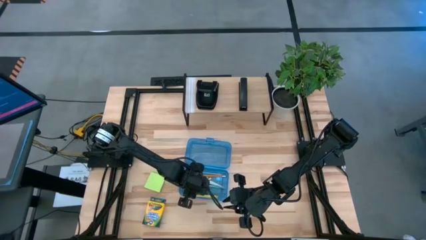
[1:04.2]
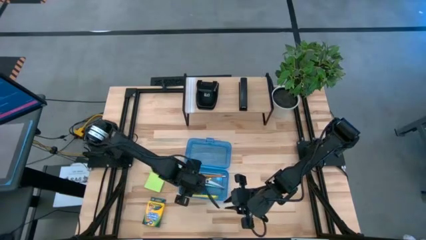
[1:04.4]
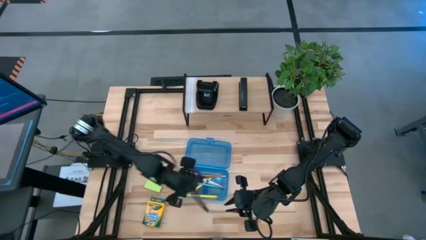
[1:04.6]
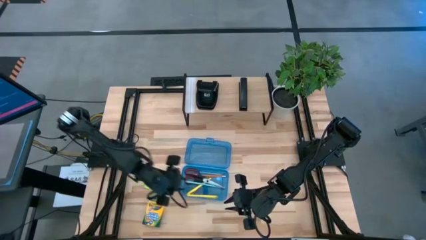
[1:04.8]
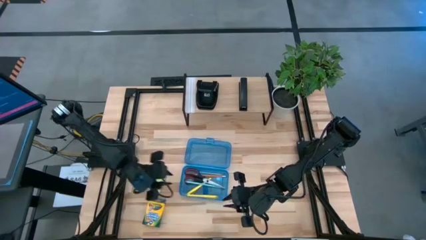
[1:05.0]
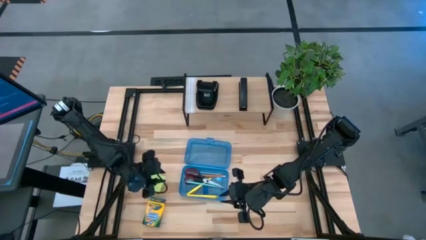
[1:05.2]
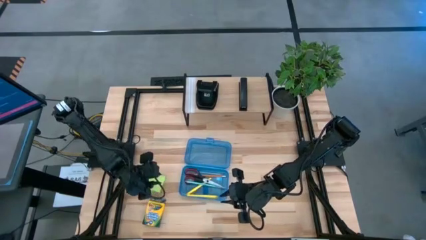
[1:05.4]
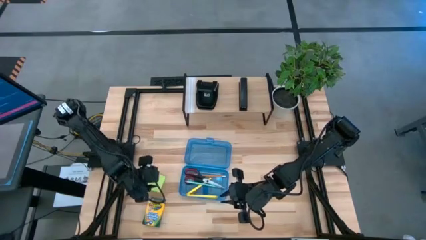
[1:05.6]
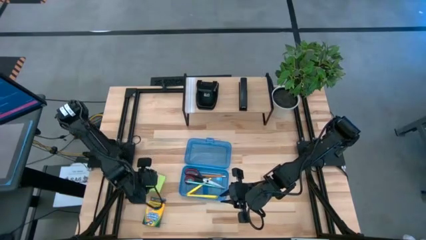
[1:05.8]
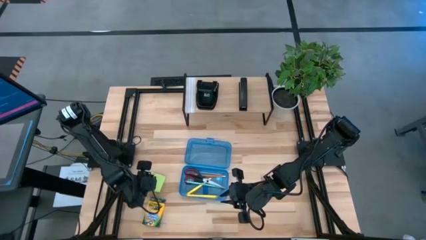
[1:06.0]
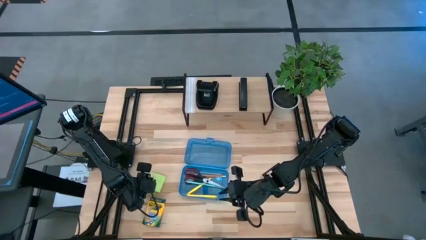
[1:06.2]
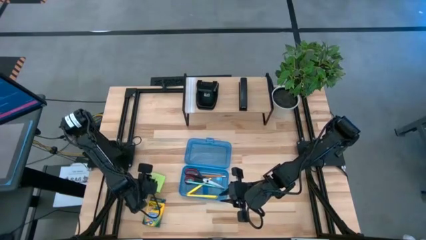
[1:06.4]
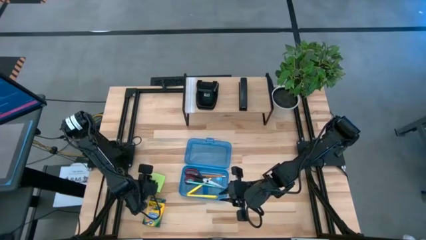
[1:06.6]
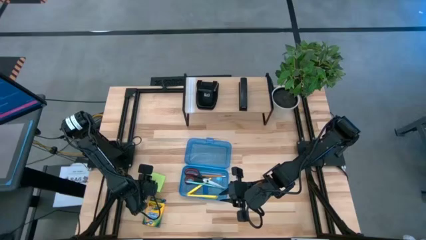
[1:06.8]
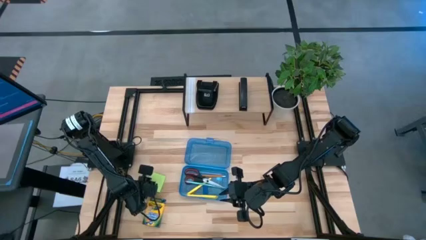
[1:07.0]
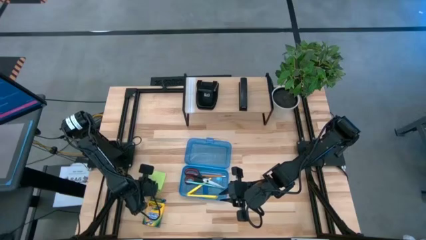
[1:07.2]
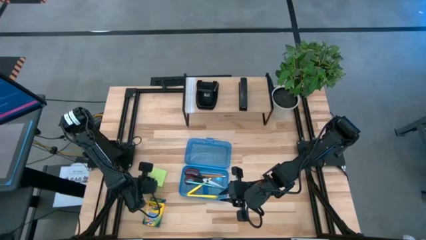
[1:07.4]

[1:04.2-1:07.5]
Task: Pack school essentials
Put the light green sticky notes into the blue supply box

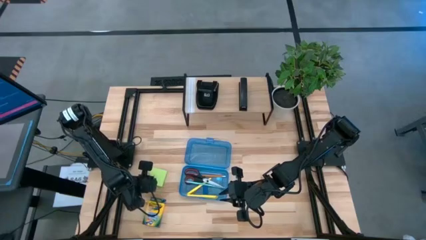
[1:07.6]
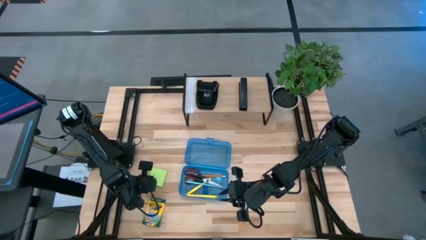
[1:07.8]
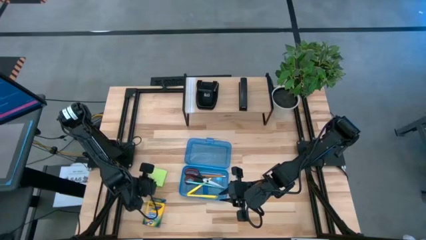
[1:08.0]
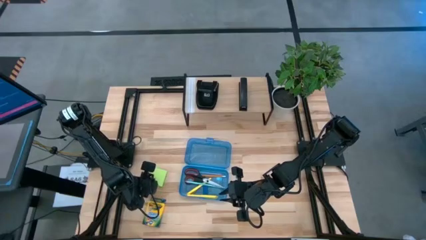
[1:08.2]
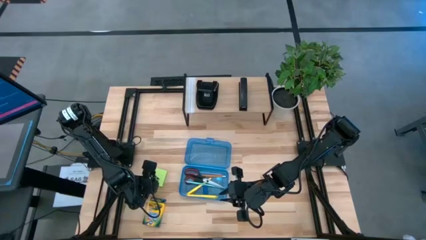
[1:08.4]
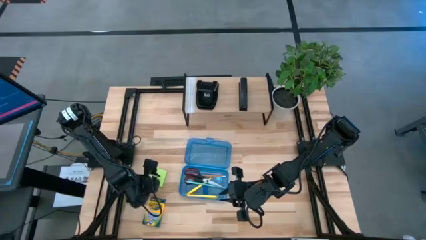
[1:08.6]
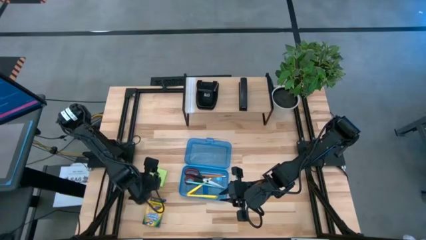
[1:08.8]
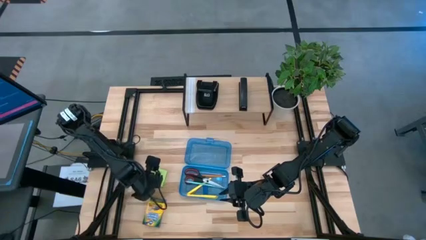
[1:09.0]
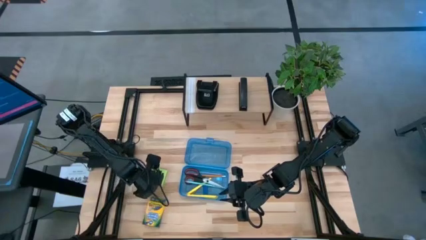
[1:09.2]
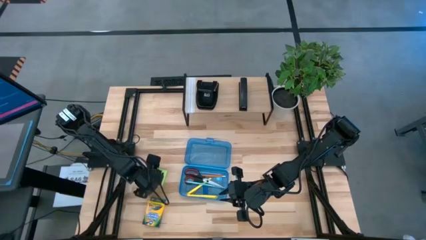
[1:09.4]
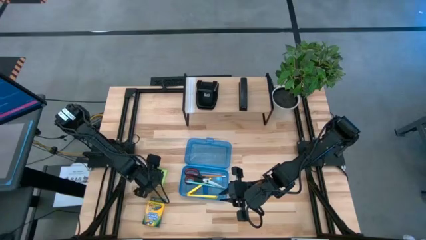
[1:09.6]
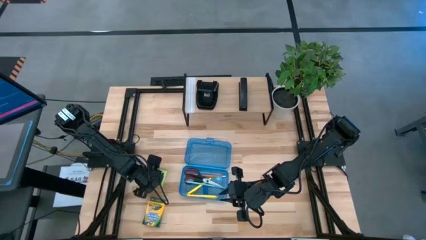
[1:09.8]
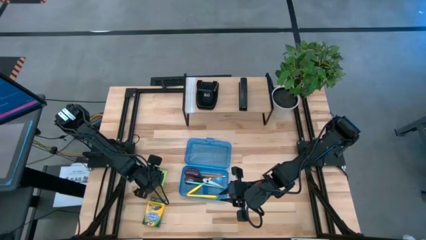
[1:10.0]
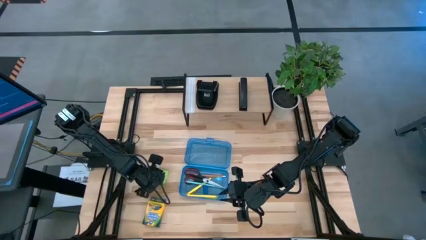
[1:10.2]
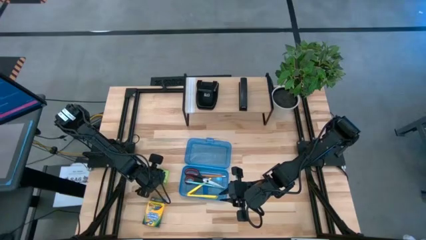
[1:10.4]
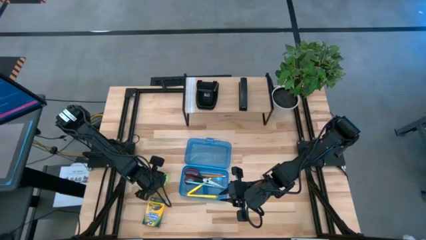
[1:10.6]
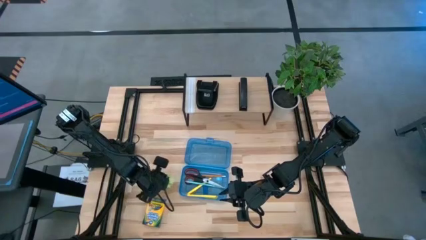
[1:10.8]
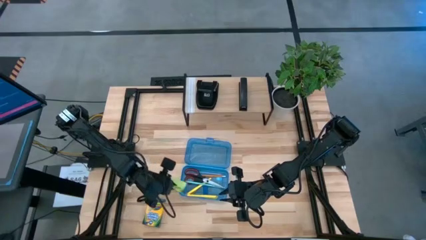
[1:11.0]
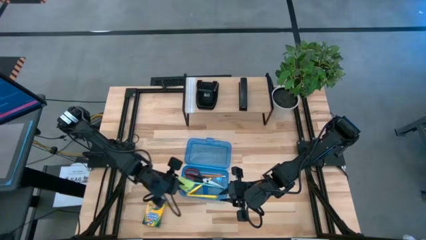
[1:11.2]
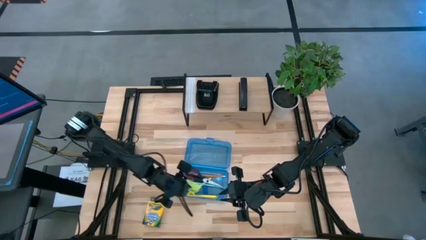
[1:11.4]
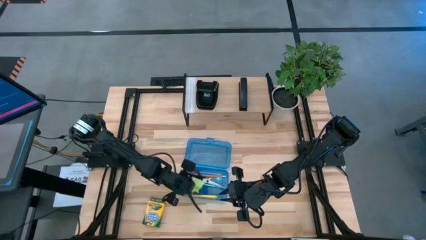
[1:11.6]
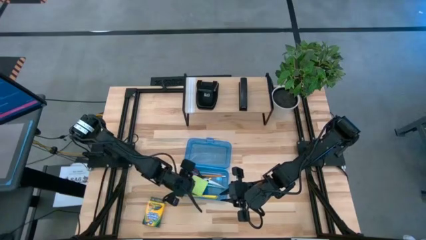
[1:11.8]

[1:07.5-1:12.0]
Put the light green sticky notes into the blue supply box

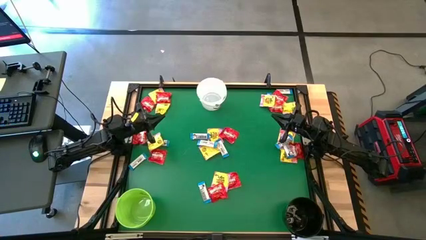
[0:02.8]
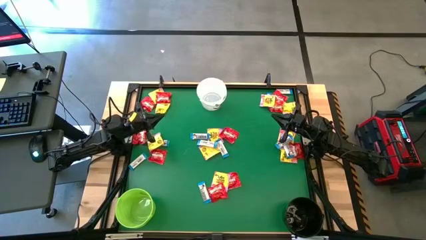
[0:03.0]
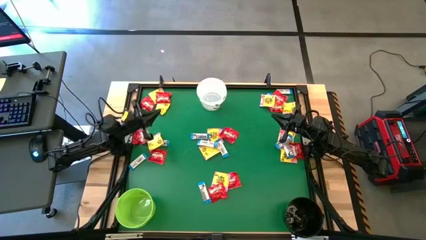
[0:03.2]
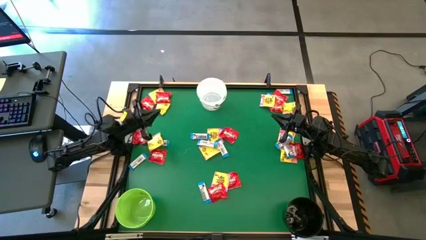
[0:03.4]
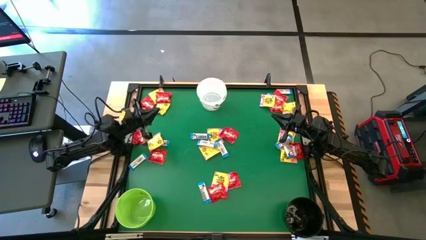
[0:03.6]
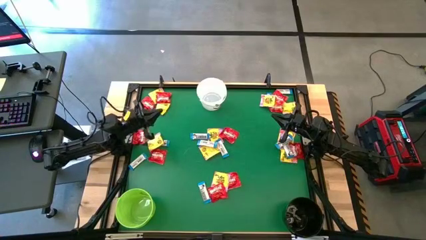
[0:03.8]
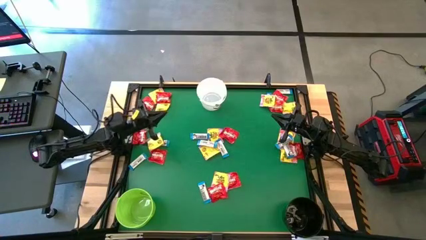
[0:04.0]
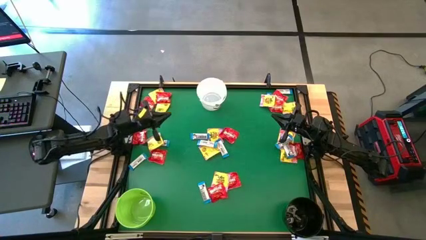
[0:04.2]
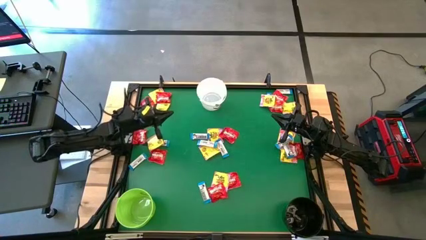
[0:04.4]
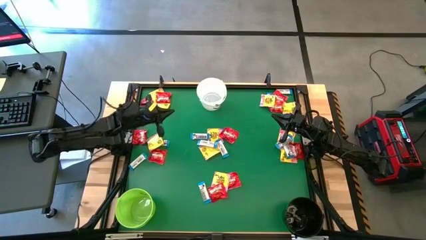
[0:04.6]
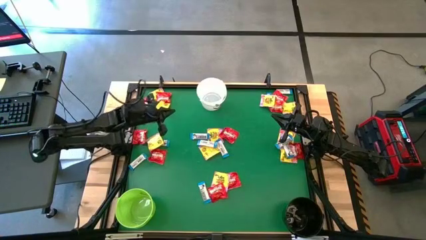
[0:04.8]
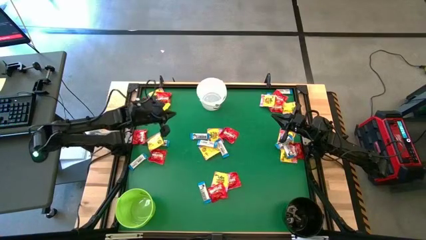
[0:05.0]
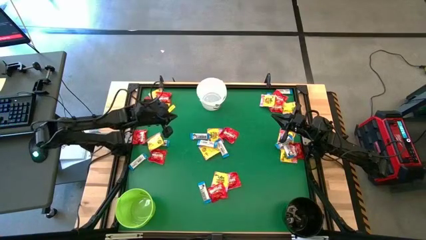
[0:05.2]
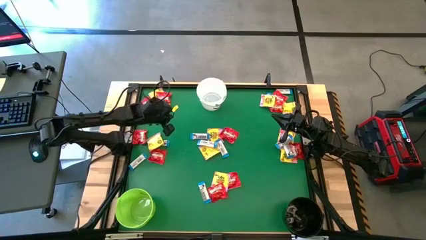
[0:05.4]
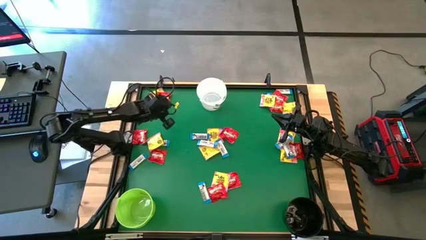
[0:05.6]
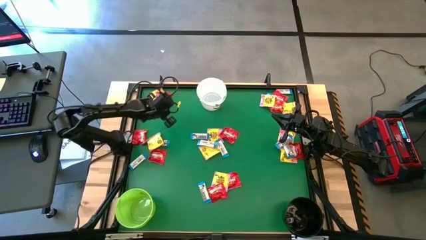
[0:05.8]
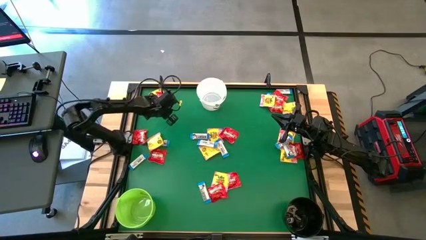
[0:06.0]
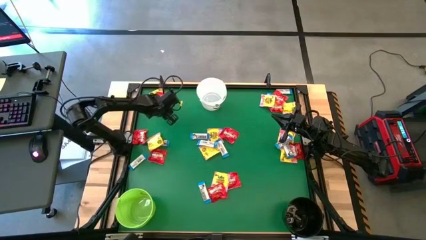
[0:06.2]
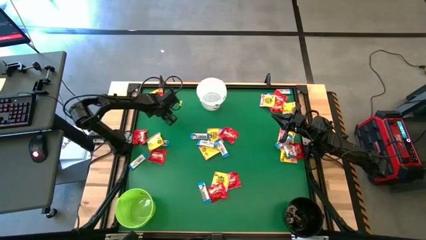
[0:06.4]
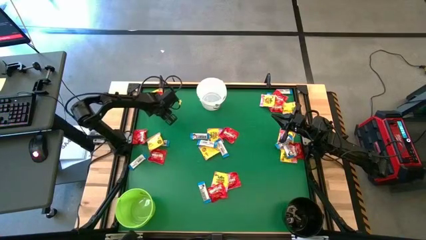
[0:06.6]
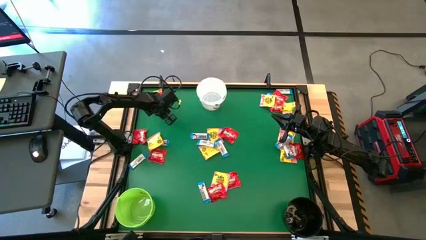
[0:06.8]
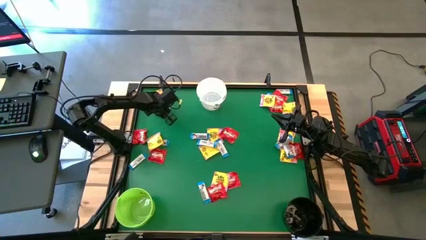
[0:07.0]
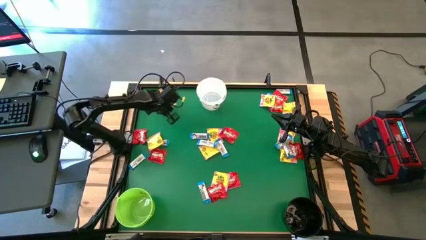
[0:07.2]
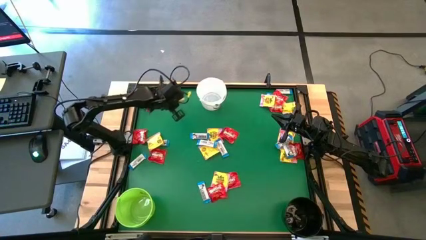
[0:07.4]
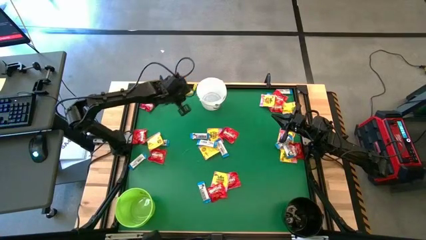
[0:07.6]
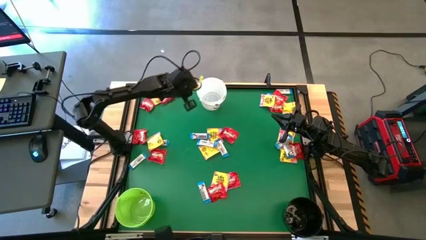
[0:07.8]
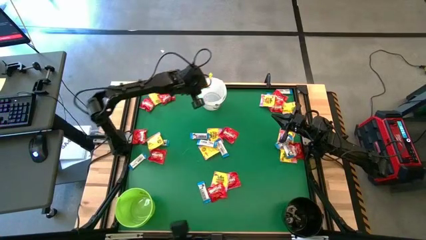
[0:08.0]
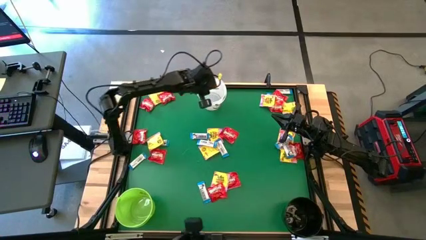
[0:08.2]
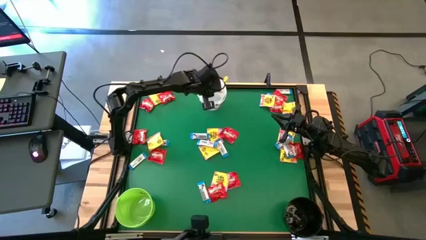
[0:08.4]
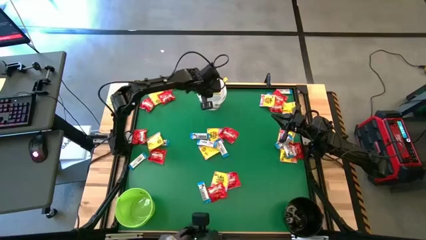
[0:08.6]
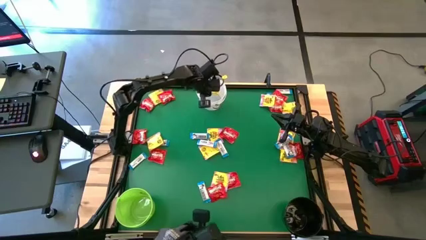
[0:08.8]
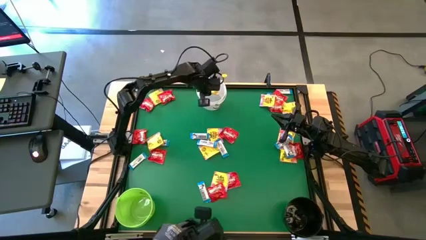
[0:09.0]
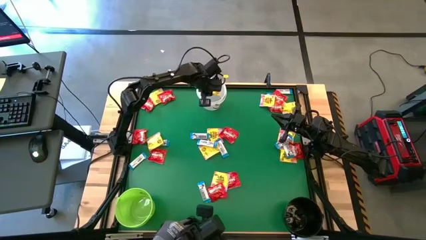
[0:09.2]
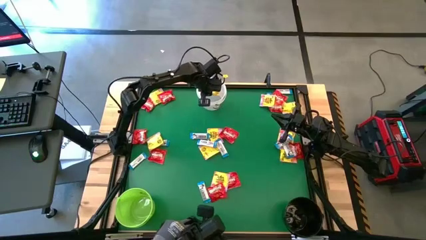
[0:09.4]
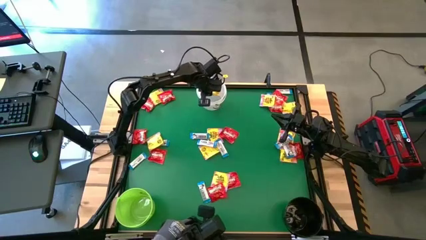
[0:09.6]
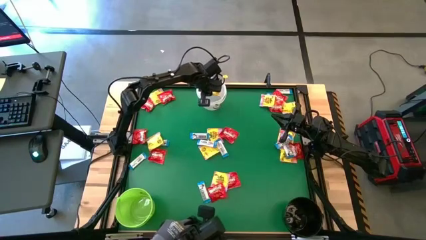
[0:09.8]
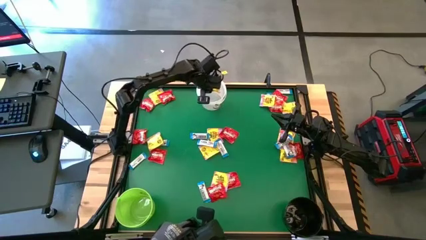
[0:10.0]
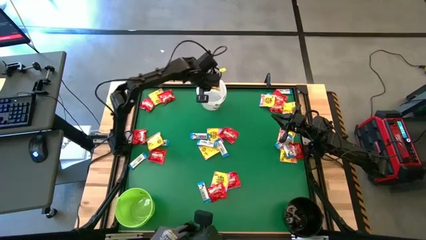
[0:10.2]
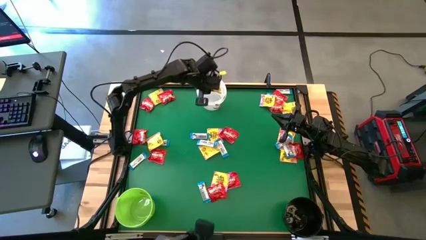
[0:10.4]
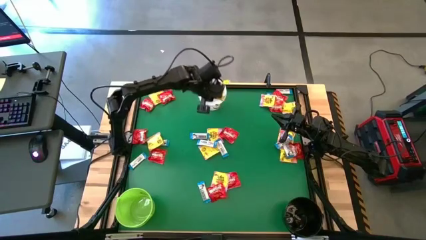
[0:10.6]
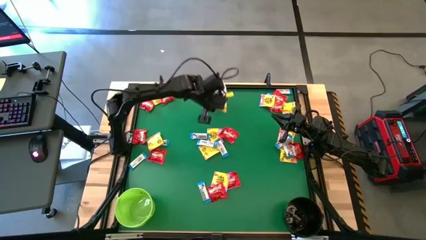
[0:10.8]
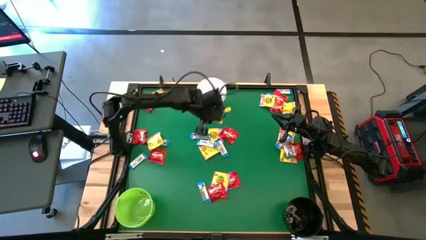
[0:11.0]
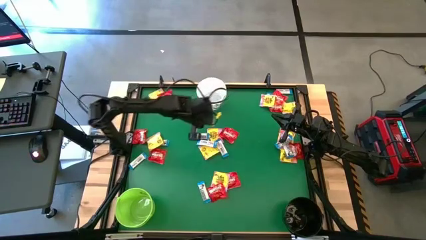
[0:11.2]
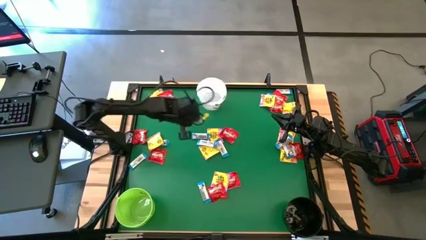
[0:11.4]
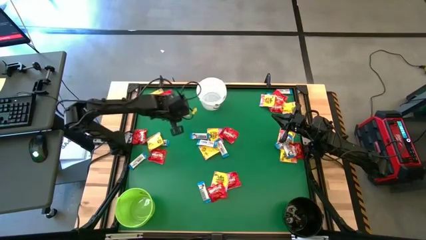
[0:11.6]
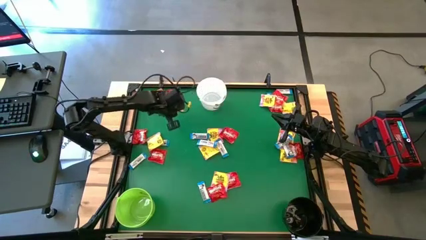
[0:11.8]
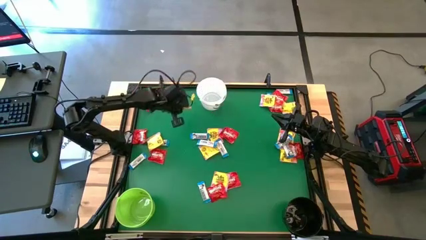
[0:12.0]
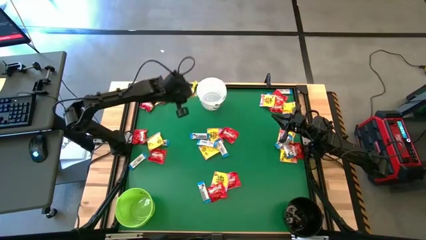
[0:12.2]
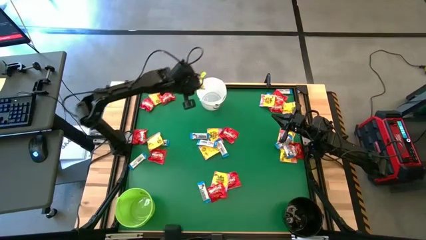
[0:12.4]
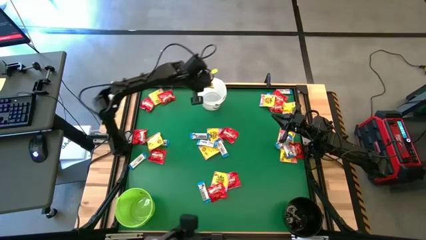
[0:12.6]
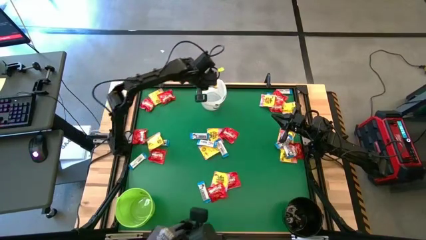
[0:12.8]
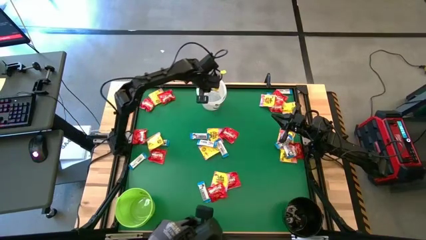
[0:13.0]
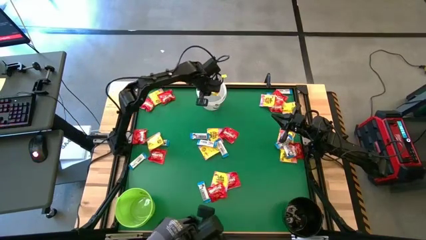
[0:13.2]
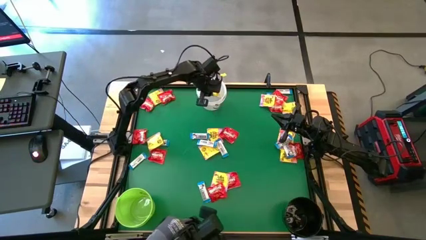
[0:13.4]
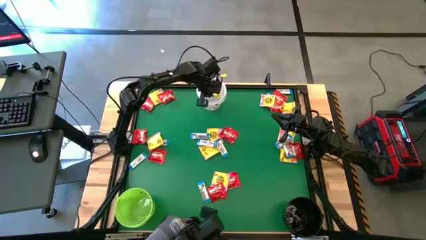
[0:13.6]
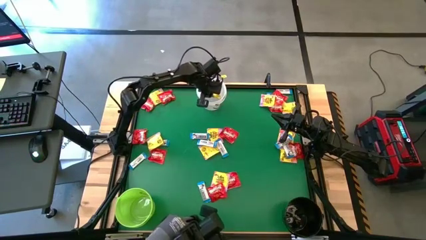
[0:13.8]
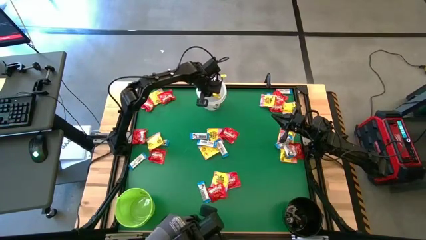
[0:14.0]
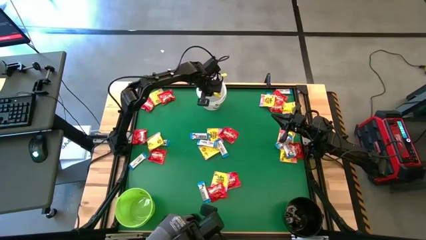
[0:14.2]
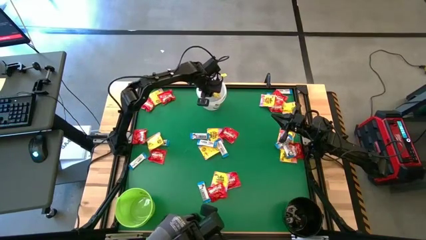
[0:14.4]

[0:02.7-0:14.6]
Task: Sort candy by brand, put in halloween buckets
Put the yellow candy into the white bucket
